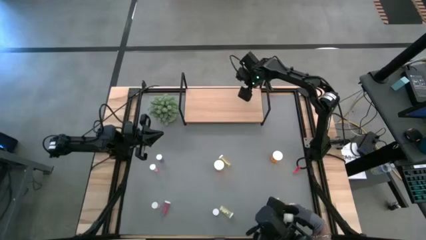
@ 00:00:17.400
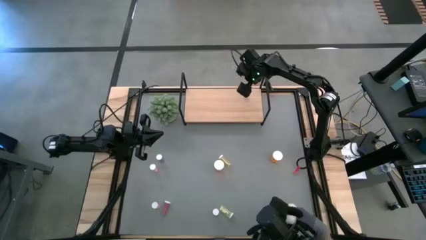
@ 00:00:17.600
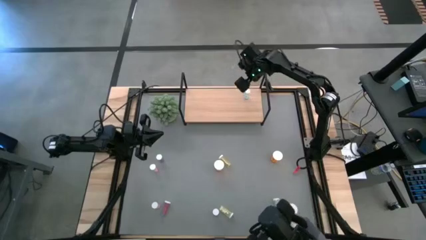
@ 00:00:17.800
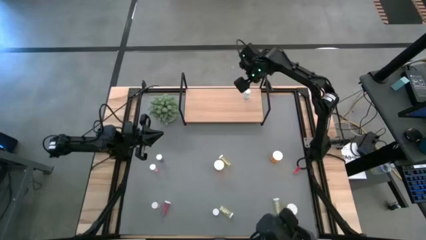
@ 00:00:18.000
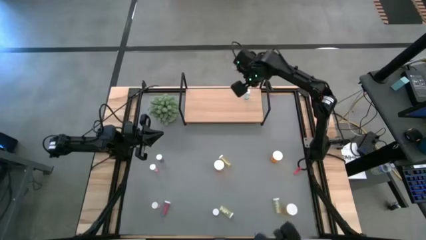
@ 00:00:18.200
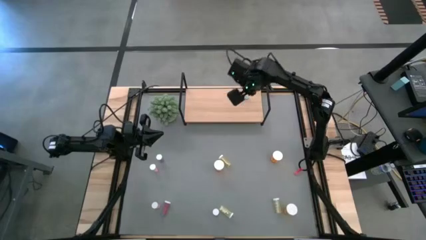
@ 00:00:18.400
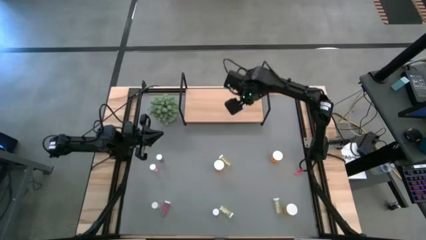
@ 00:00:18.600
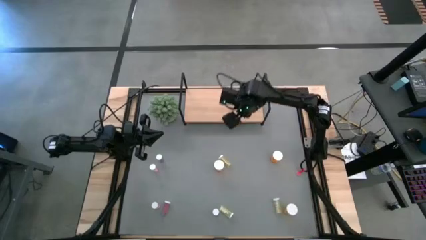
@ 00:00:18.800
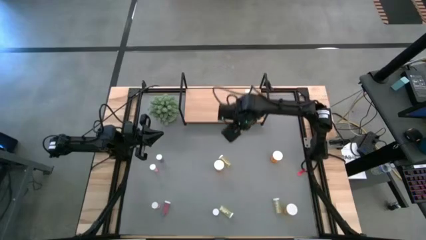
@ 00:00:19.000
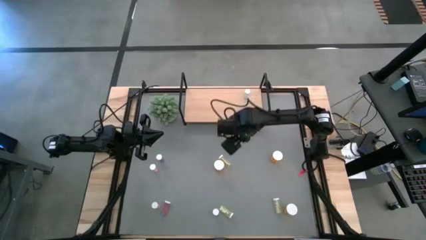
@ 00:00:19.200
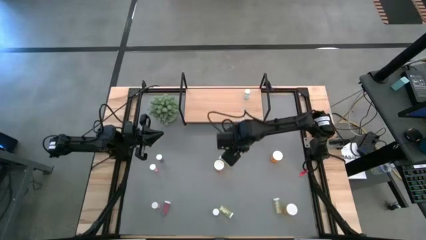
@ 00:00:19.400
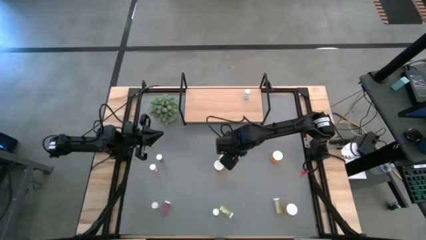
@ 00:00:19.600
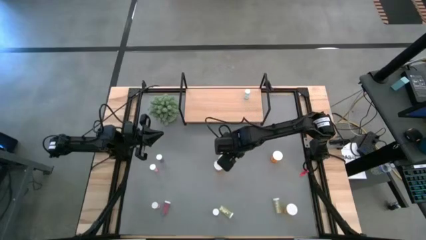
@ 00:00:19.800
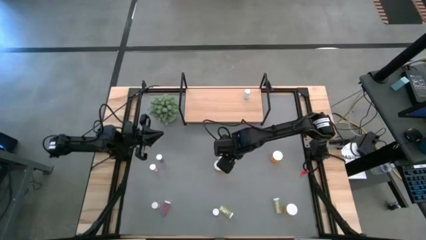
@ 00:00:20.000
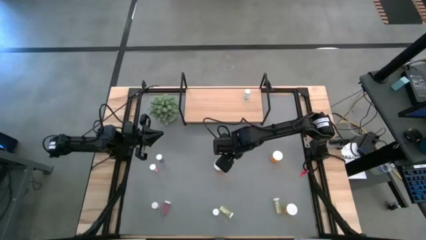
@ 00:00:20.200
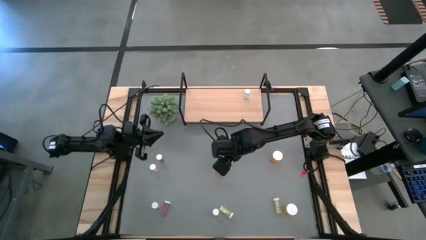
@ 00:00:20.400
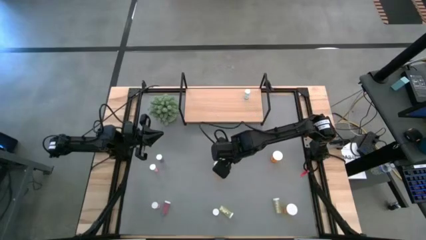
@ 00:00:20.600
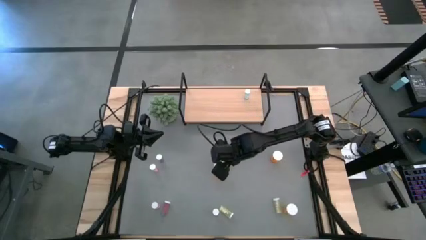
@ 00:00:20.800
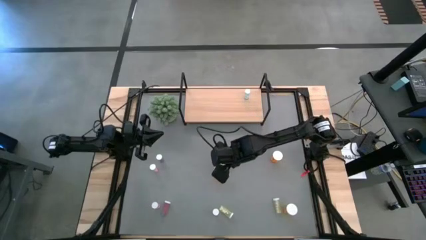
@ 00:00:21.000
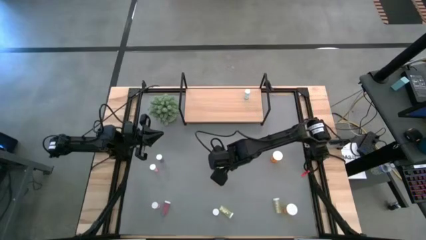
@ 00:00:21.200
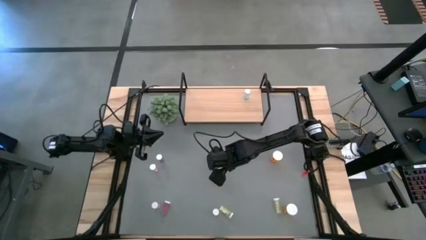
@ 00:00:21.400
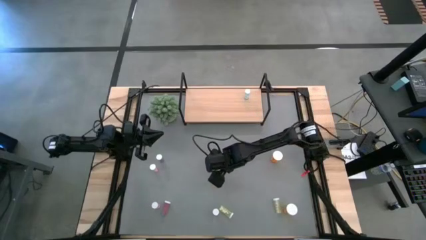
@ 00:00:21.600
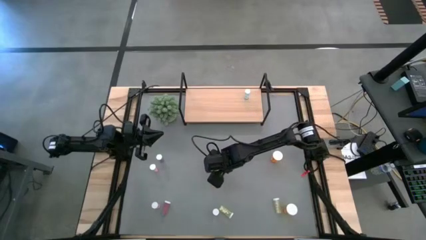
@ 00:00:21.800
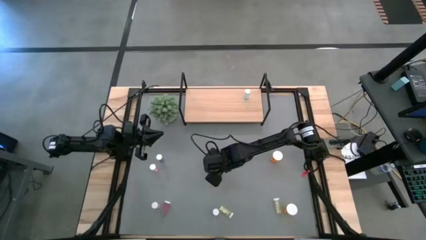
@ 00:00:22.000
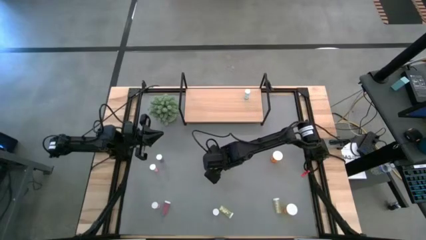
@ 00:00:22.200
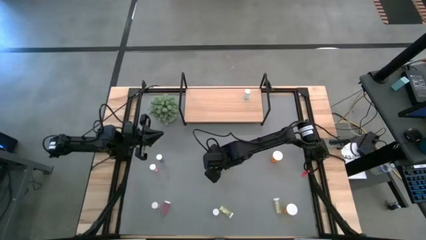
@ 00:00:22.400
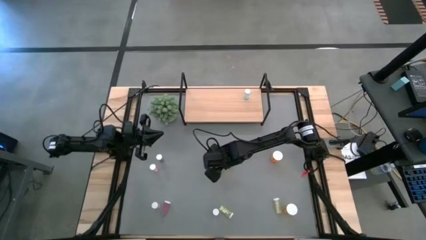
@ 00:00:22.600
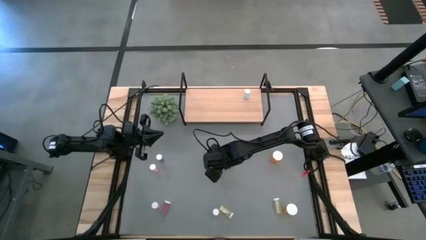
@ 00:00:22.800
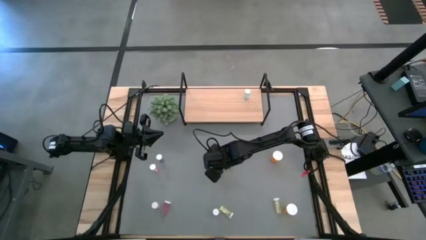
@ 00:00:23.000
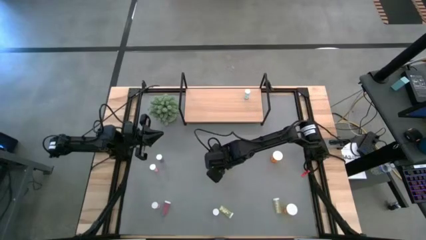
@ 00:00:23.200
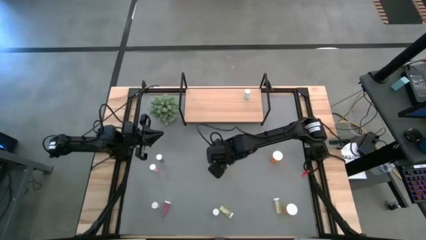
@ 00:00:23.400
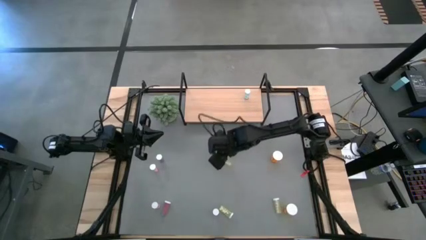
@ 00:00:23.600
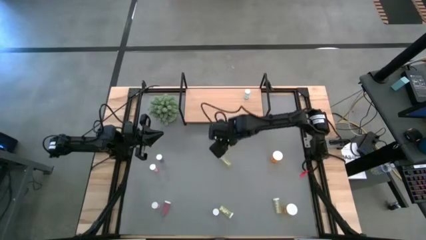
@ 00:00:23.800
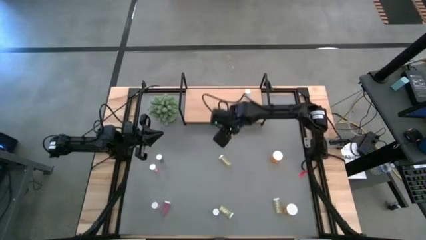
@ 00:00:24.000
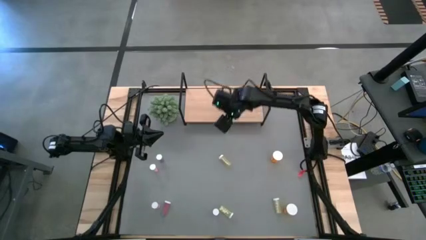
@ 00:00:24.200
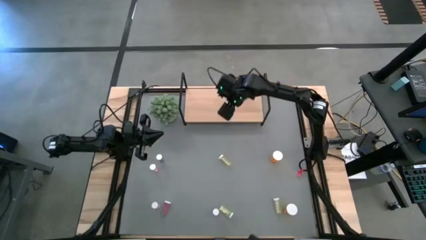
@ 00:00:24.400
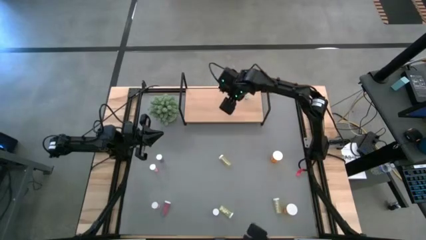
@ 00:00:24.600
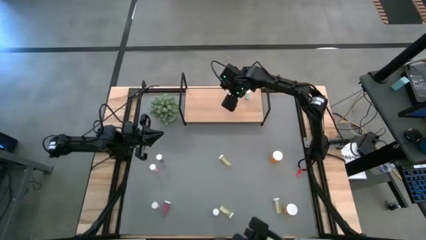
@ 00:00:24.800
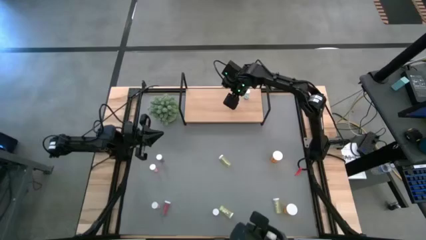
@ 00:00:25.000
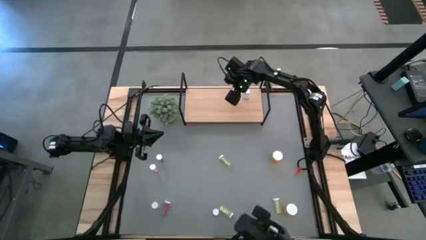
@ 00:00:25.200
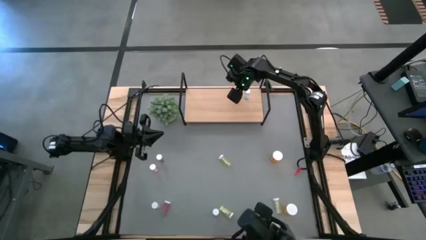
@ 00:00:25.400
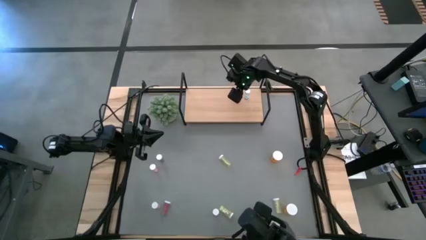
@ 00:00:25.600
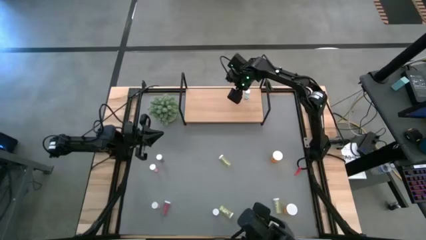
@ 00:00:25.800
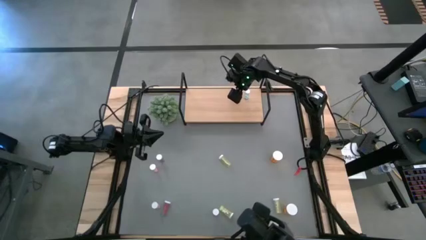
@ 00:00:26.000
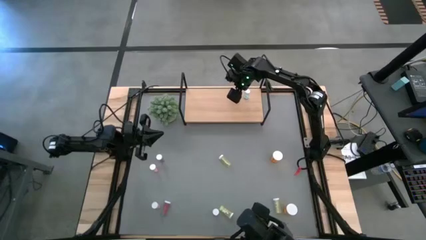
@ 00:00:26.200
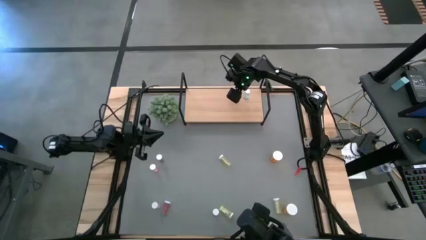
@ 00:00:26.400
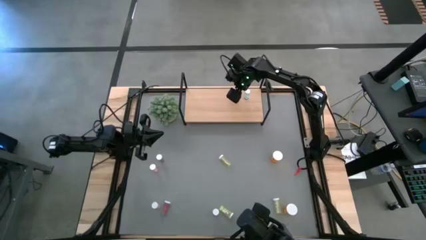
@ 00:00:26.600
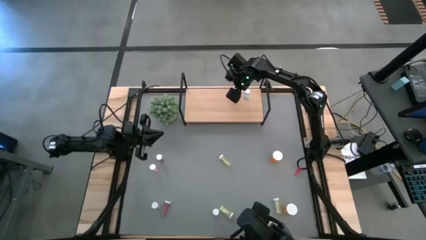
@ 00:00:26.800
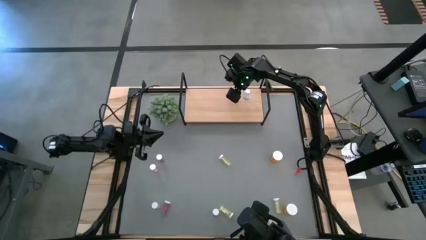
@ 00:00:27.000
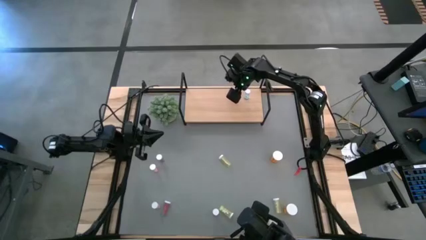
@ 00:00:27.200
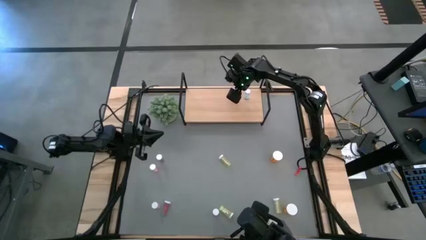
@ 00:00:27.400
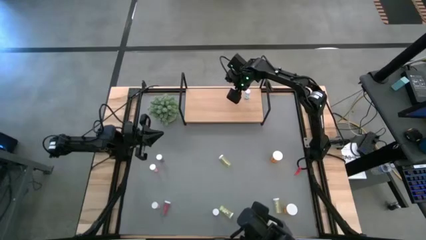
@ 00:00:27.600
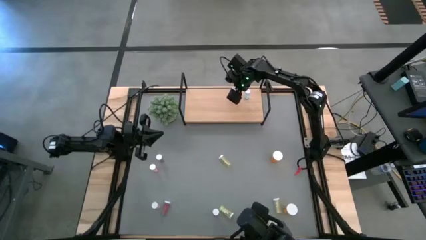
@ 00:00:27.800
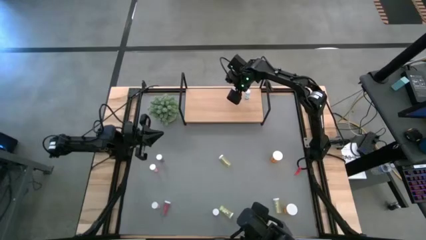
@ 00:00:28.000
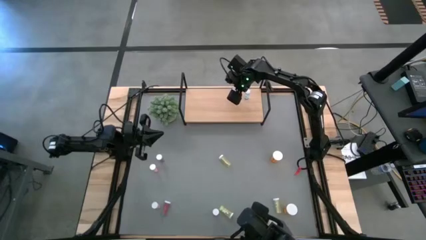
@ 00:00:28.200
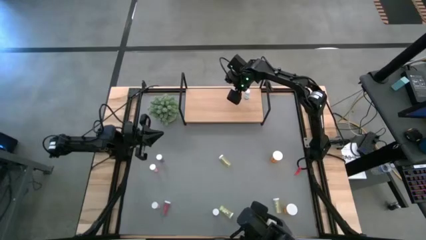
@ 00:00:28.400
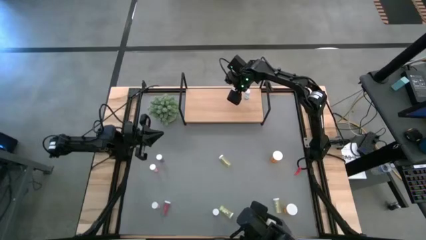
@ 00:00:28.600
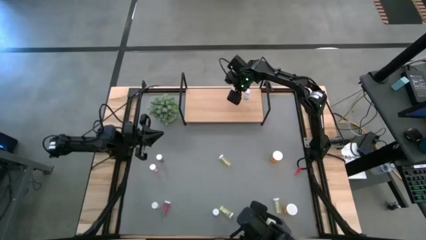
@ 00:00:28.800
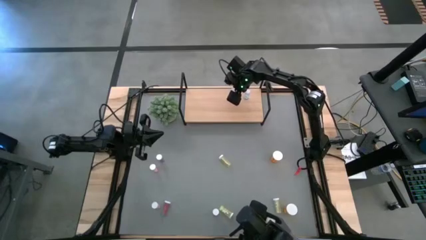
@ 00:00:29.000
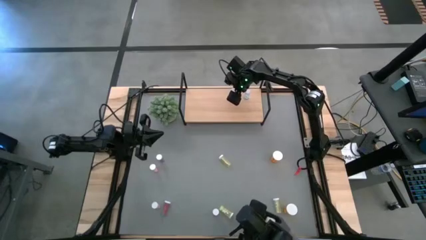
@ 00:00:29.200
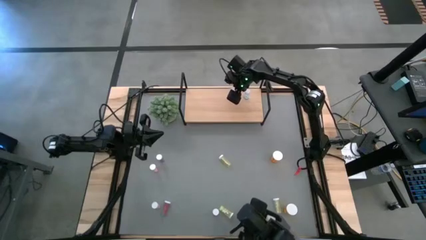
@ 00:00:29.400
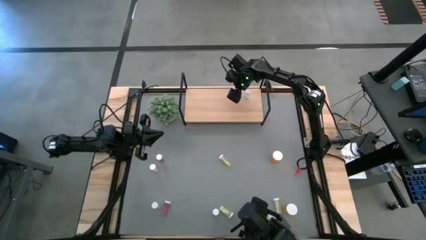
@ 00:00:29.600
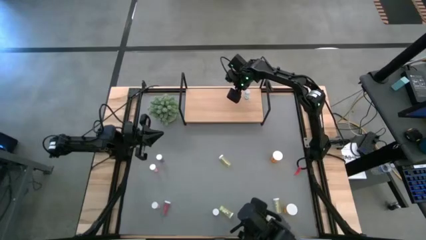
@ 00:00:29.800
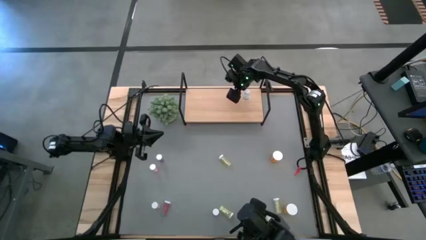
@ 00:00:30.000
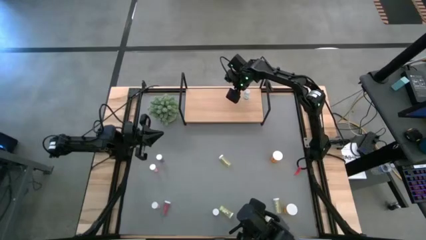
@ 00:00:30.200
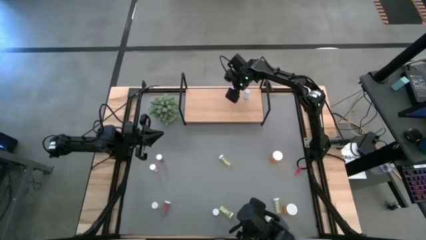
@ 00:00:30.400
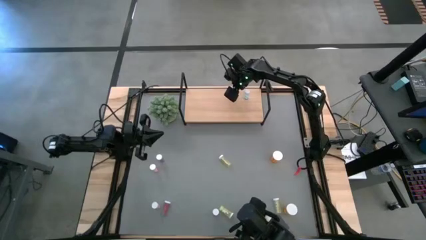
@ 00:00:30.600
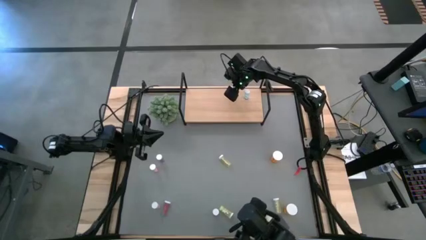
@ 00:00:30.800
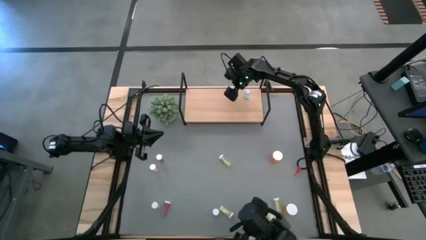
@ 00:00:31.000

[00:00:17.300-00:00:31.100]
Task: Pick and place medicine bottles onto shelf by color
Put the top left orange pill bottle on the shelf

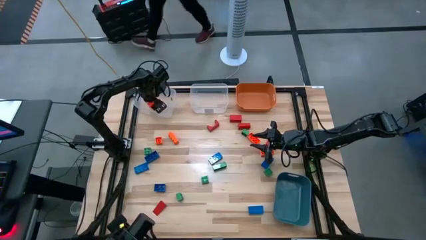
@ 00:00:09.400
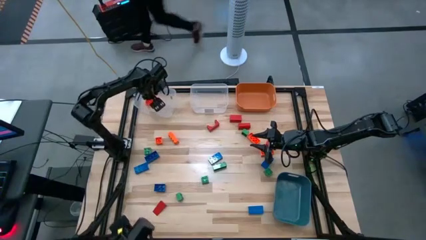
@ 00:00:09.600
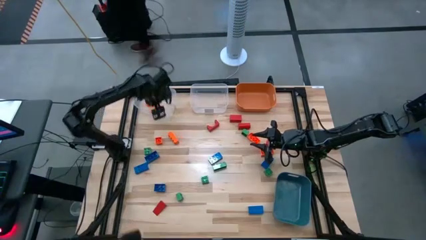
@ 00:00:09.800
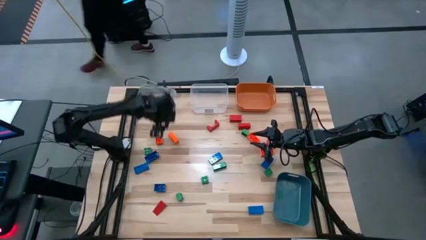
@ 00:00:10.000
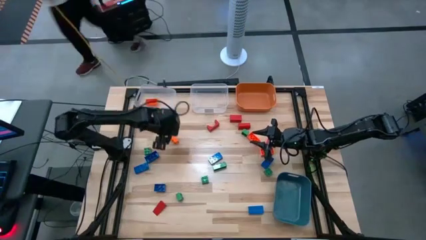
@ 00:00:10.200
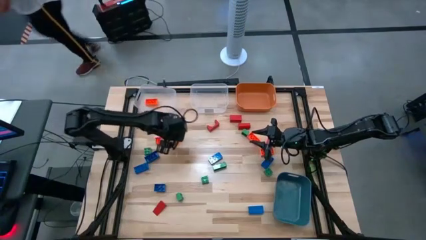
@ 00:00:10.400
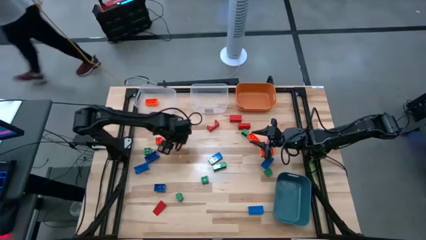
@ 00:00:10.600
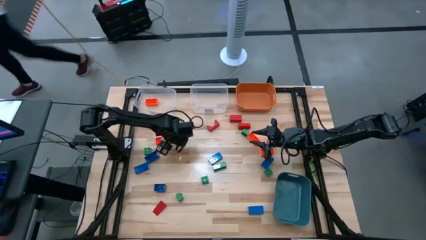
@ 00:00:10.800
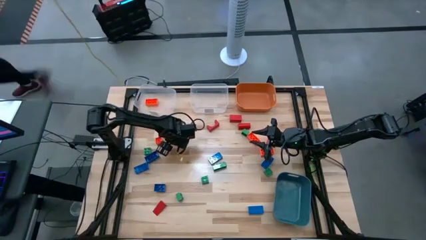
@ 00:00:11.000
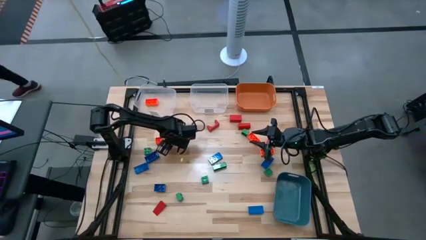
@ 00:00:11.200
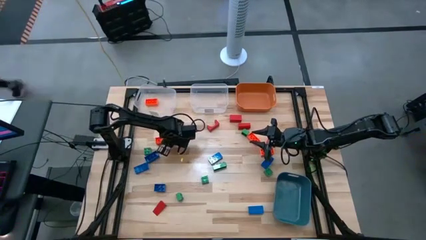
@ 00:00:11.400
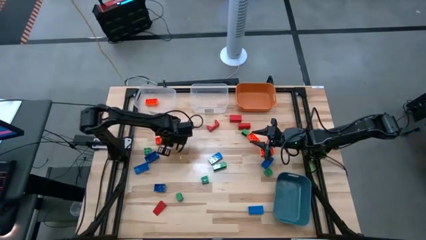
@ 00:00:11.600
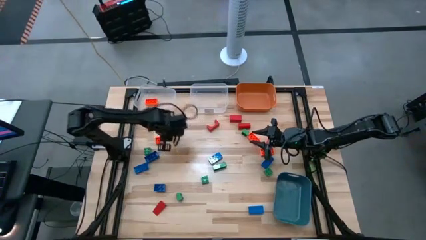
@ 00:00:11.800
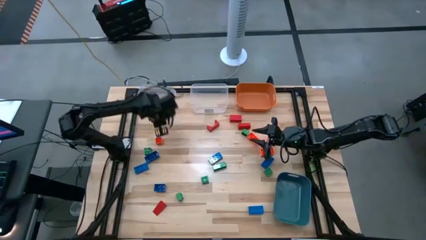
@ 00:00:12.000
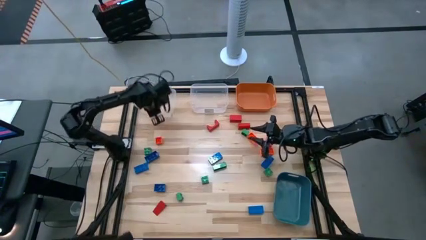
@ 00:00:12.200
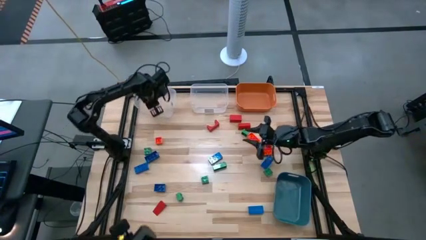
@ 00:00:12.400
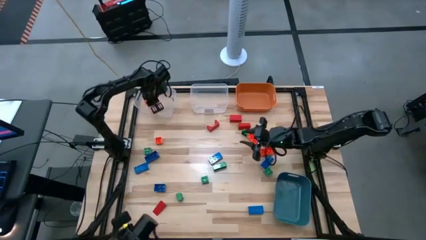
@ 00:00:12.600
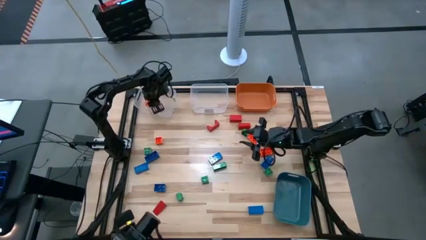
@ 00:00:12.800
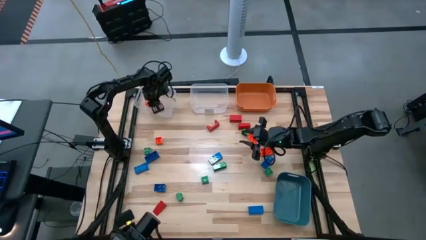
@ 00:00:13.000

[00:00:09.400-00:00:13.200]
Task: Sort blocks
Put the orange game piece into the left transparent bin
